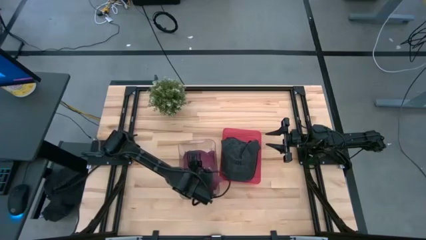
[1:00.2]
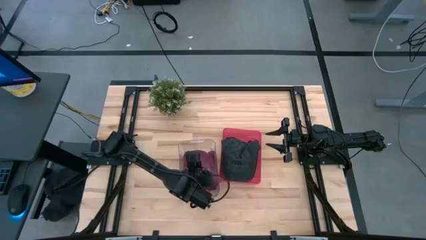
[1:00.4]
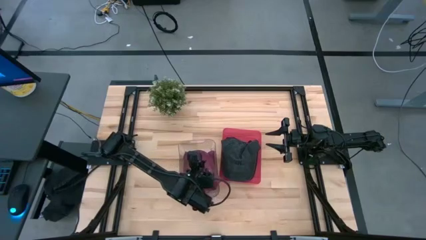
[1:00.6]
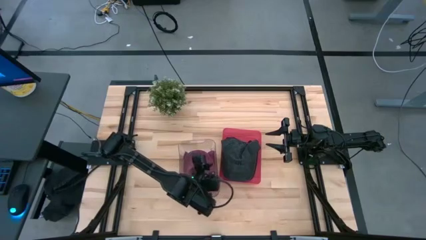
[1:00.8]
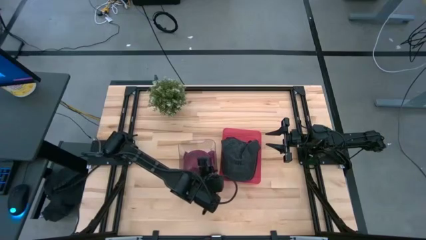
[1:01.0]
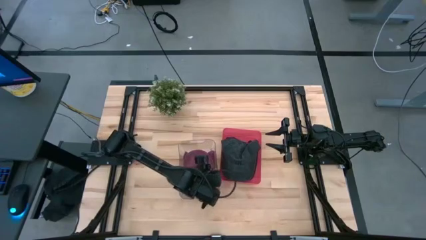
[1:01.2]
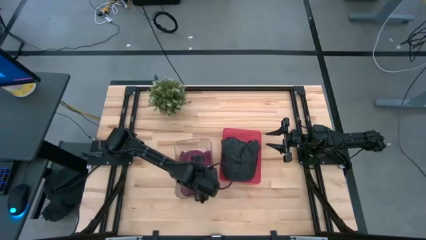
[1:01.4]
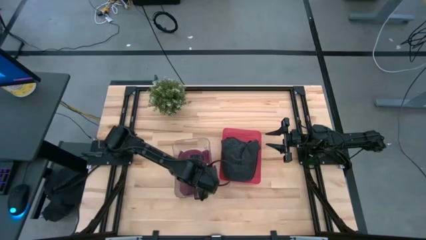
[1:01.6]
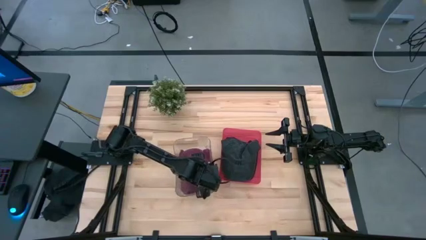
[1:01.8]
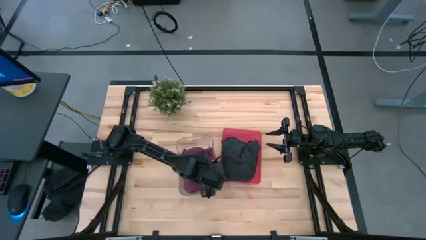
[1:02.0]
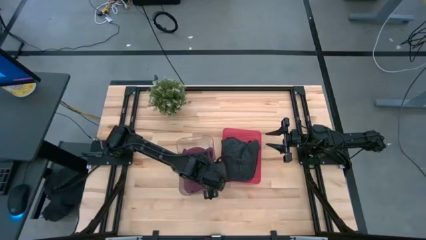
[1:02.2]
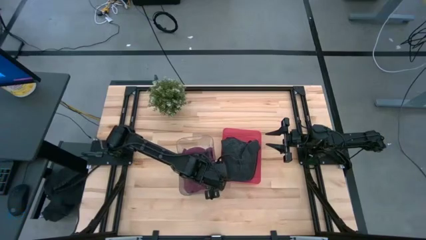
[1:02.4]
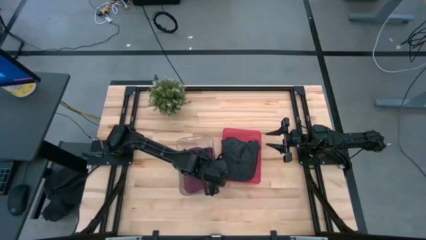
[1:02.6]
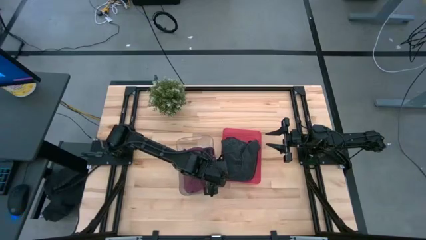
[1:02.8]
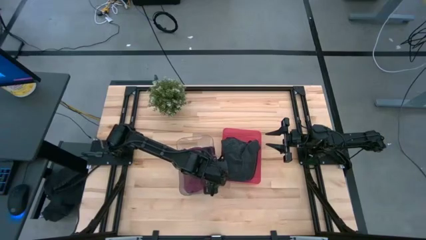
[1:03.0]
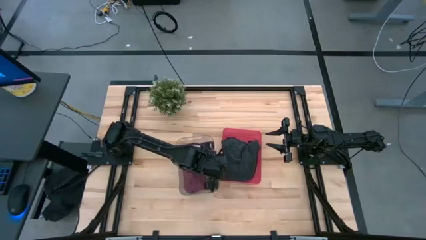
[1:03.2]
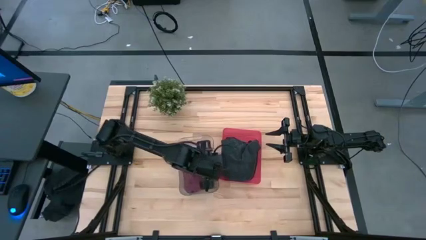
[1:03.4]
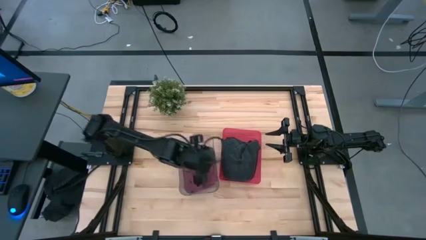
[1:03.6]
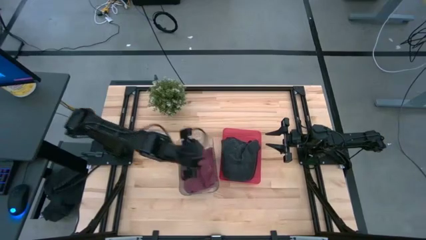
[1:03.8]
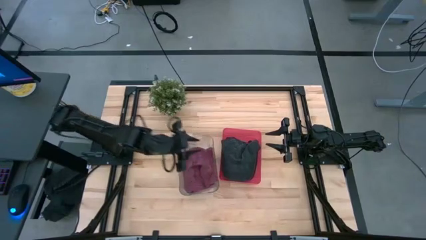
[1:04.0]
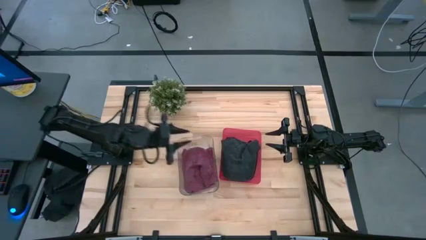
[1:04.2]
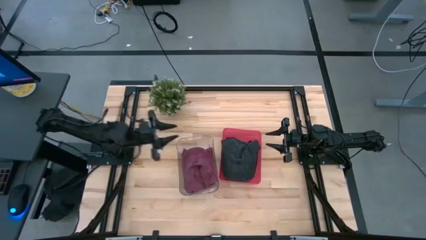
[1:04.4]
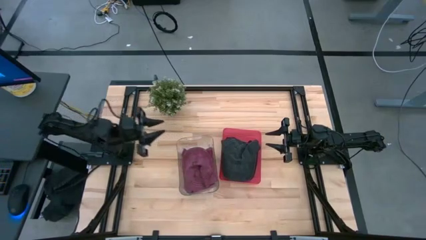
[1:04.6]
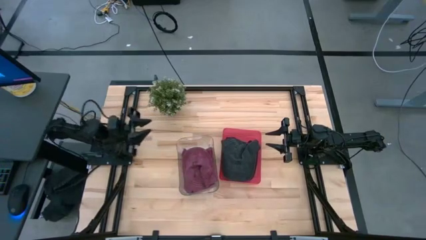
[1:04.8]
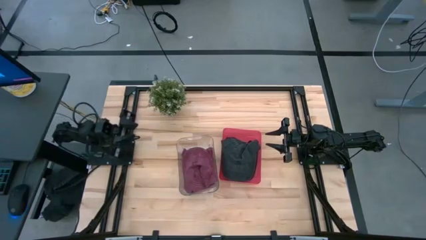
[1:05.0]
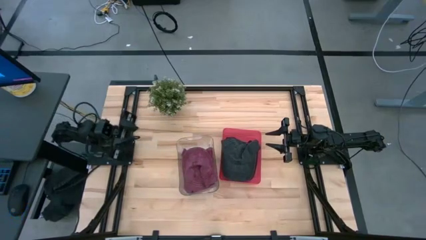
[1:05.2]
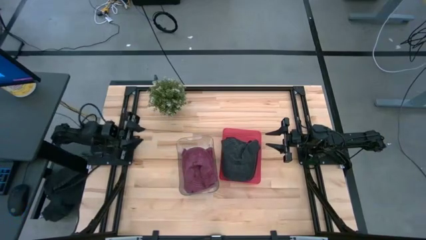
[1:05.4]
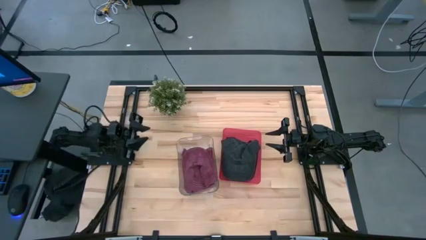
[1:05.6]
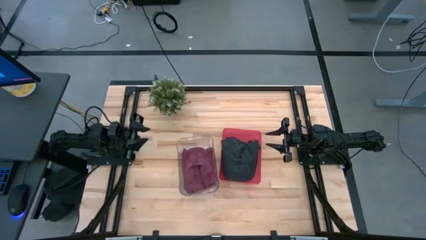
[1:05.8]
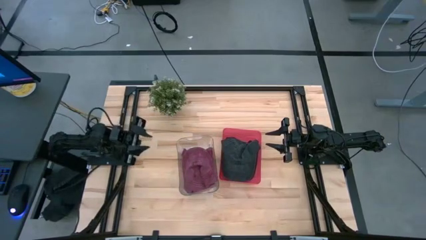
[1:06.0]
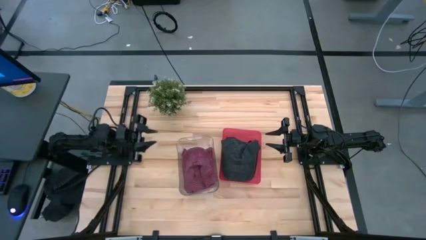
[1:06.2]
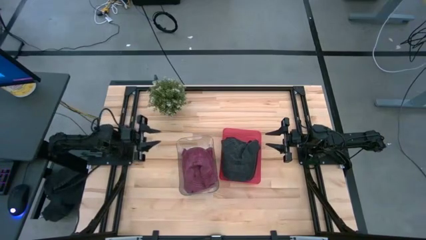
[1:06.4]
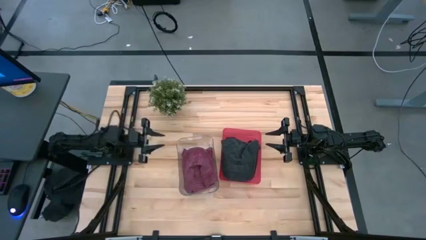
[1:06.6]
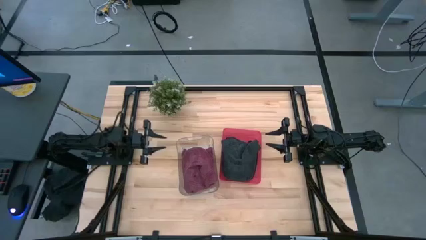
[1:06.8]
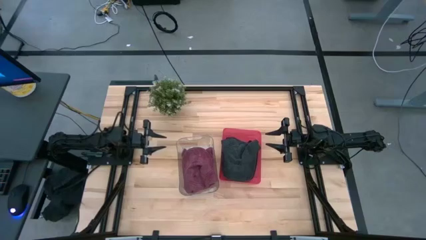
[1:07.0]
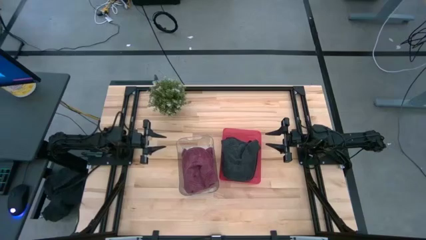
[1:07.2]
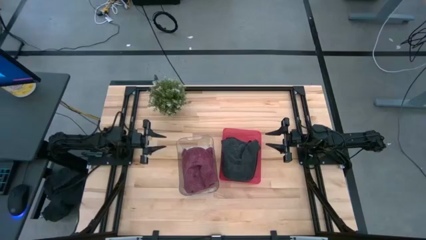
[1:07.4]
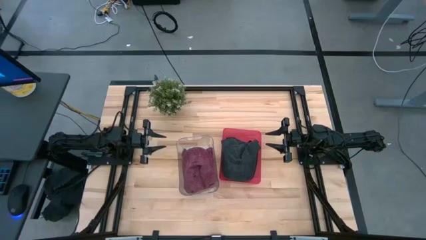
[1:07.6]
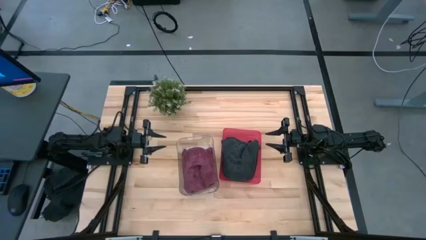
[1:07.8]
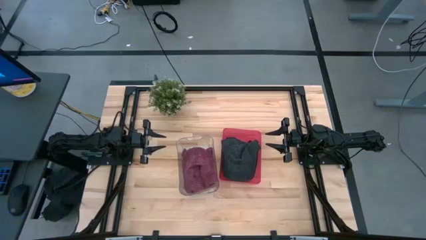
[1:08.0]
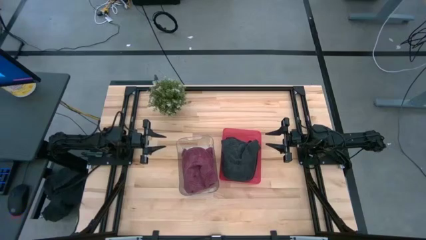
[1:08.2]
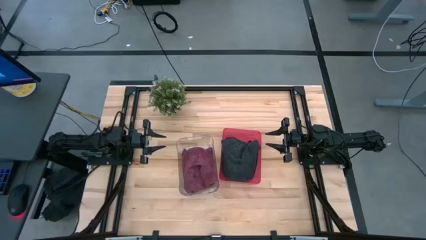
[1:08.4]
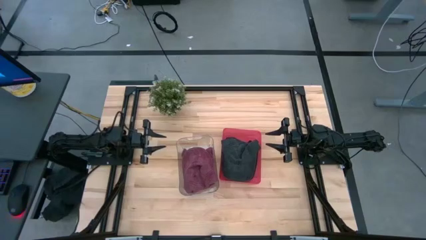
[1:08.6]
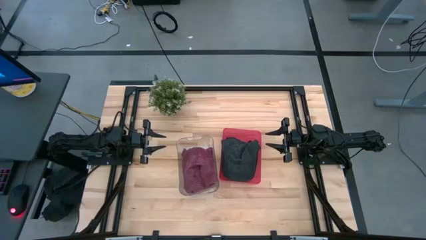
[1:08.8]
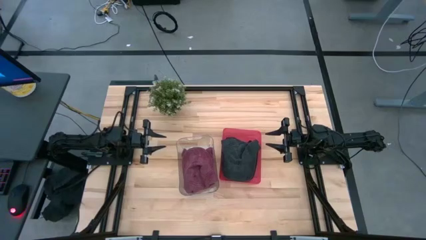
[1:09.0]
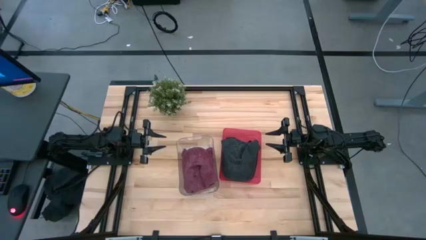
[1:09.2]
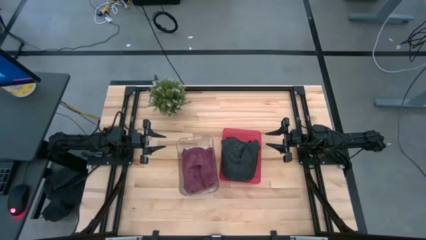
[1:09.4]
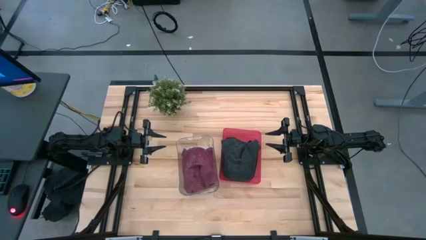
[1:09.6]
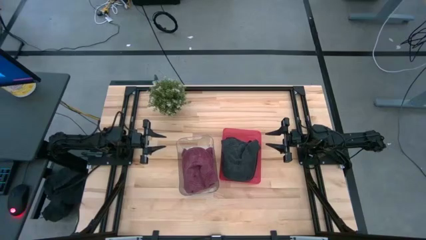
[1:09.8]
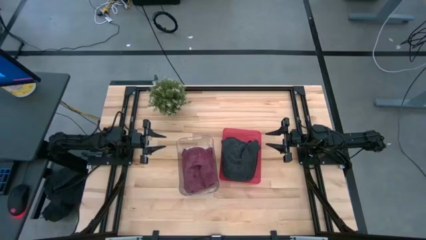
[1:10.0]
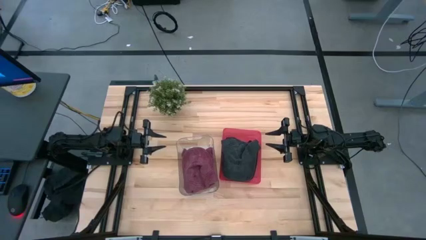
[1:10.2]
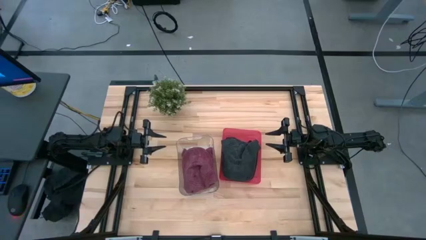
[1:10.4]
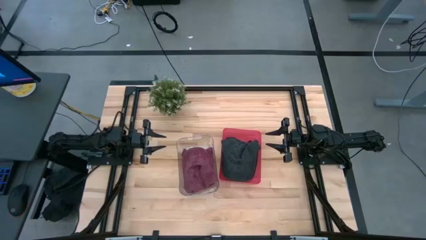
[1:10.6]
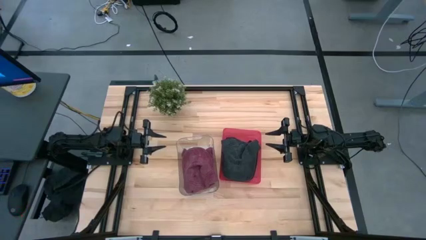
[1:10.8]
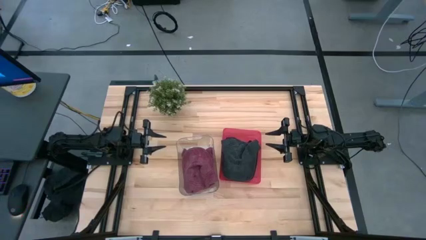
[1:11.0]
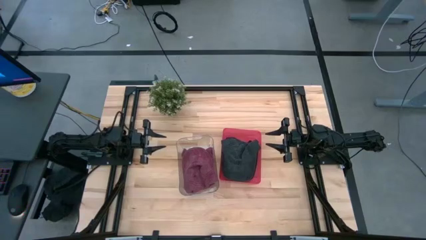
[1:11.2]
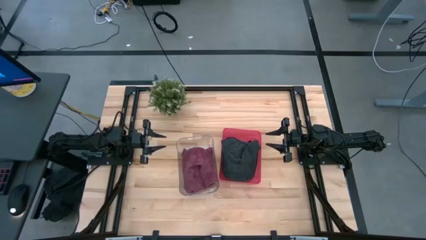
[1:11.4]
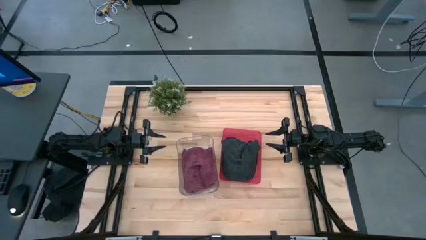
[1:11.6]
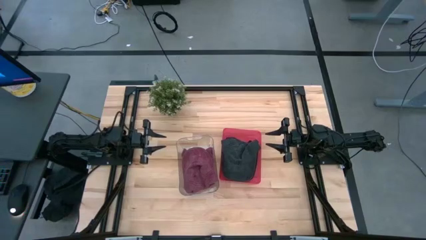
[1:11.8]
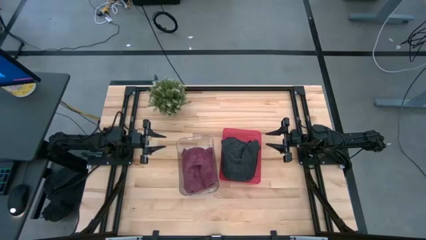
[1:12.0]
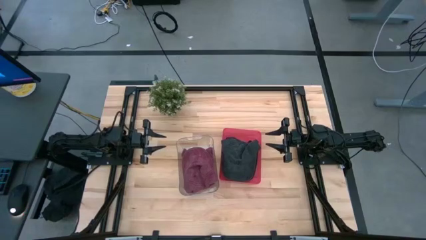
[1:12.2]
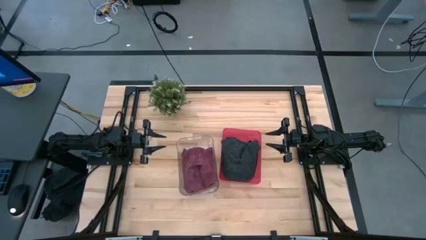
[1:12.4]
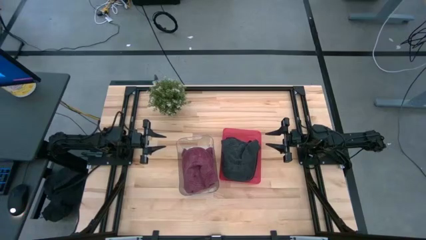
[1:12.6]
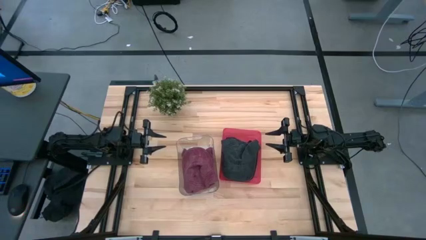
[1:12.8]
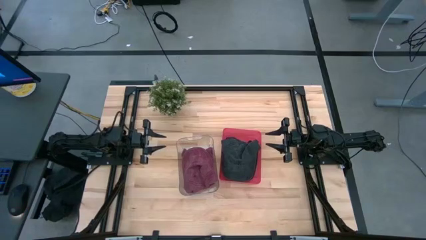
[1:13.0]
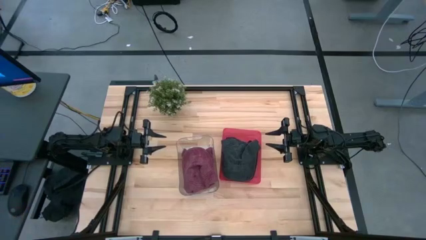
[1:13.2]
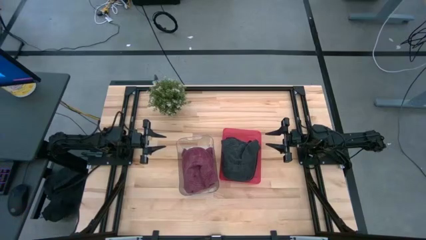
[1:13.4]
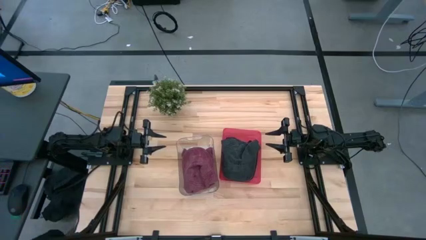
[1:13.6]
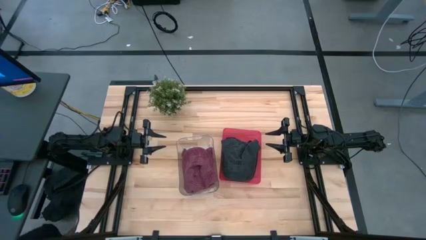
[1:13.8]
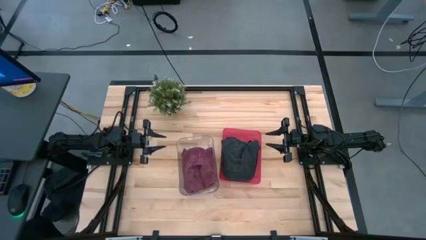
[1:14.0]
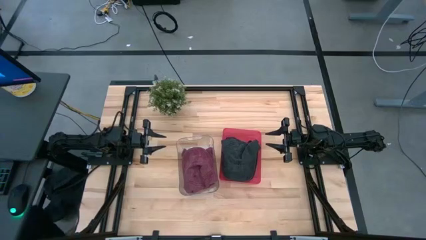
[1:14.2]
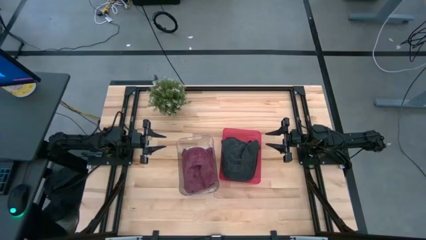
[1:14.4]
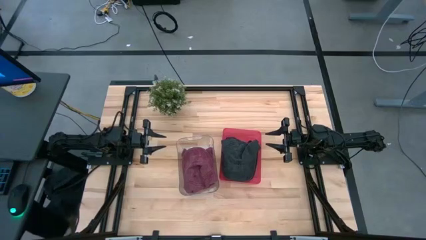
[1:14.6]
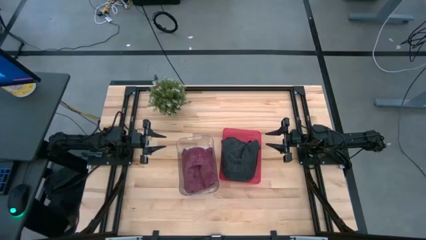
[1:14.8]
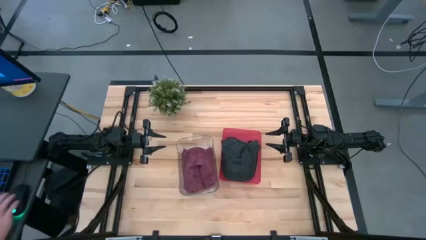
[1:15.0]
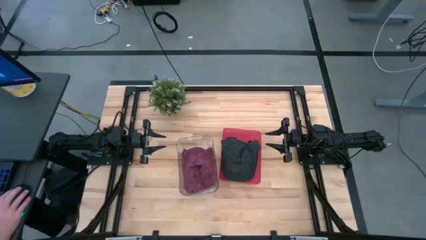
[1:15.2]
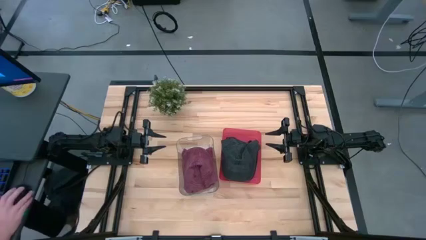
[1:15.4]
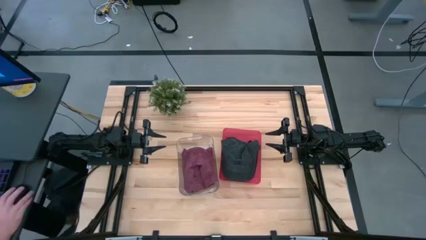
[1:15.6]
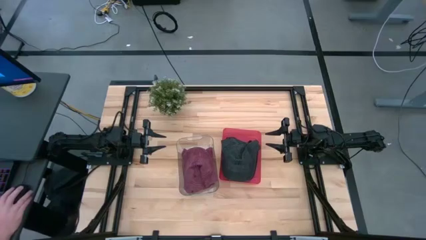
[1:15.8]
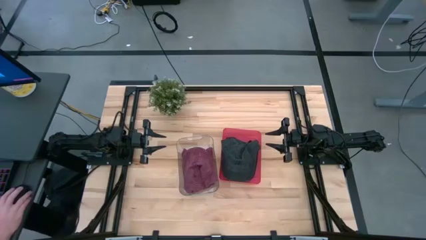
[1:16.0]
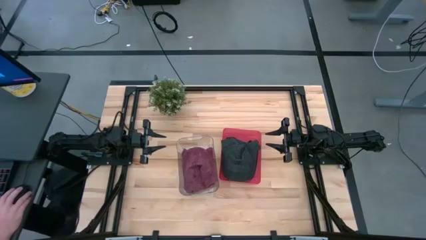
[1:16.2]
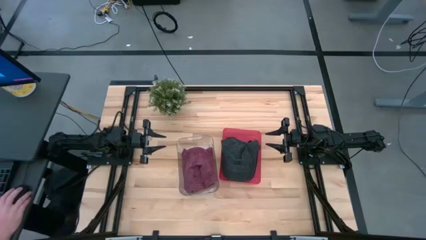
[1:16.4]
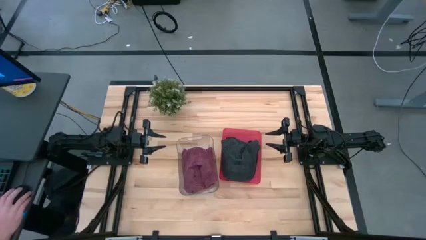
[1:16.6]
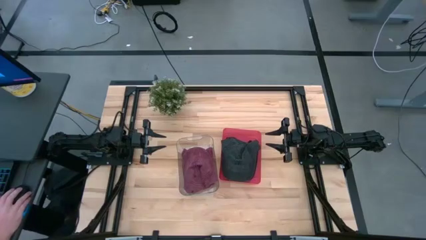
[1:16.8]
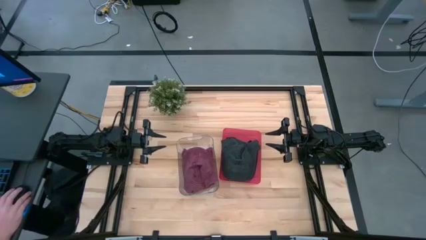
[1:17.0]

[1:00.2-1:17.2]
Task: Pick & Place hat
Return to Home Position
